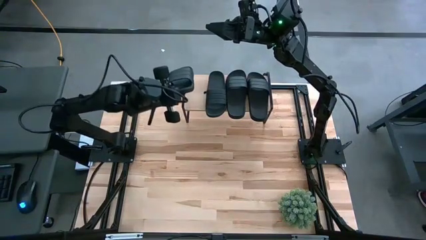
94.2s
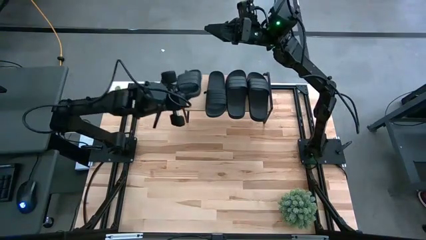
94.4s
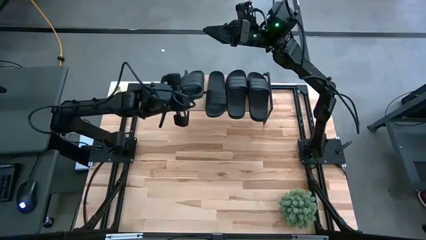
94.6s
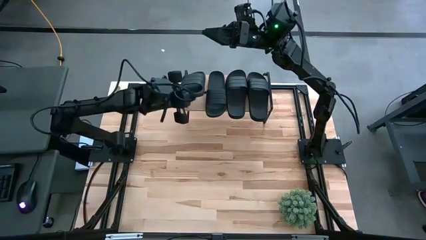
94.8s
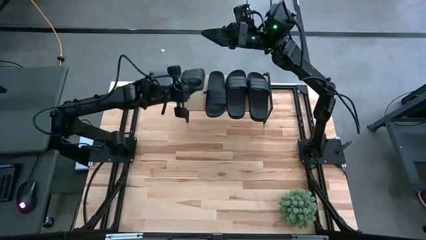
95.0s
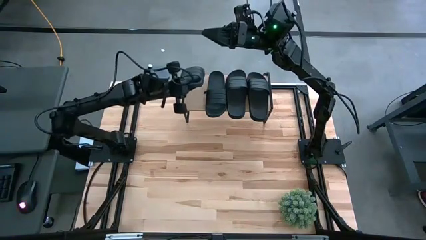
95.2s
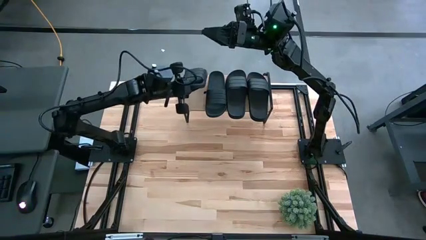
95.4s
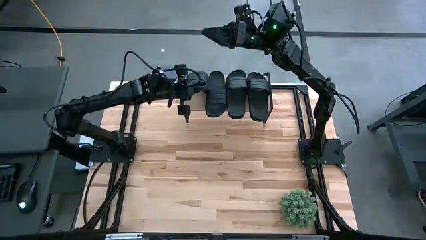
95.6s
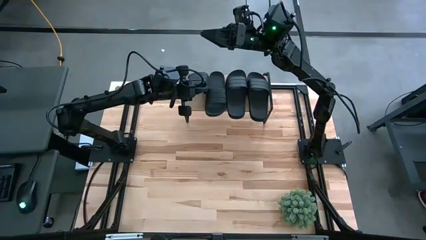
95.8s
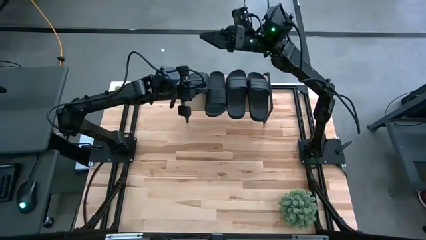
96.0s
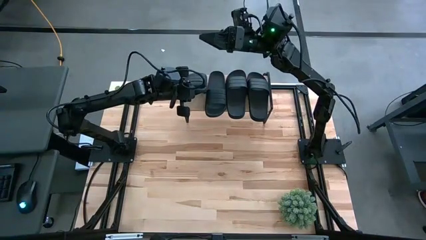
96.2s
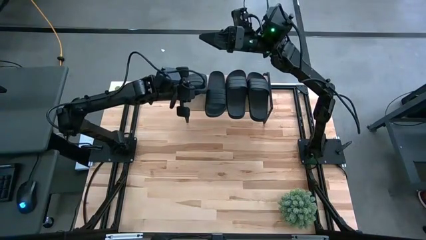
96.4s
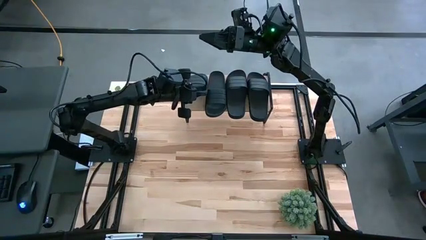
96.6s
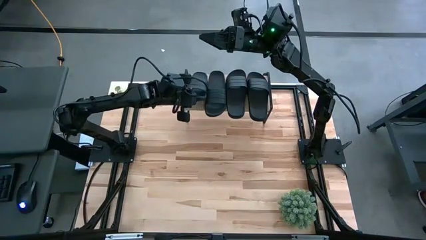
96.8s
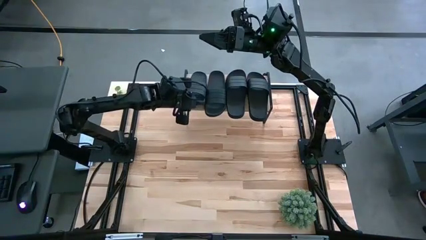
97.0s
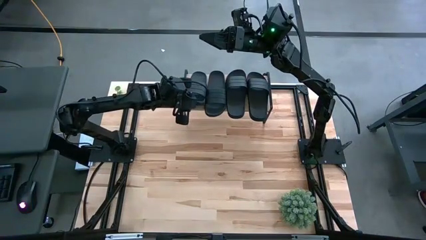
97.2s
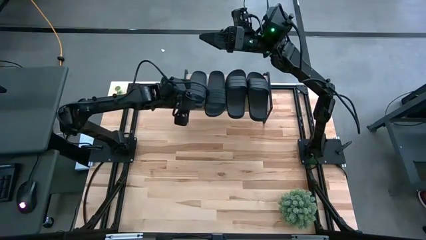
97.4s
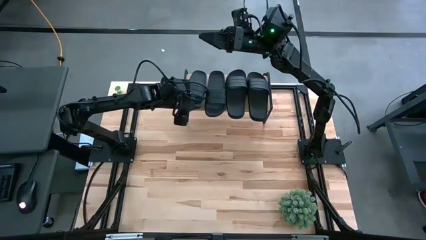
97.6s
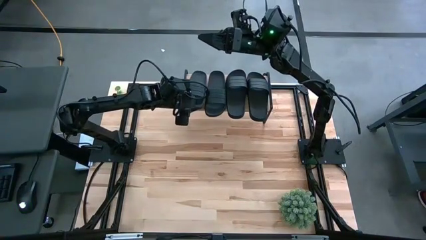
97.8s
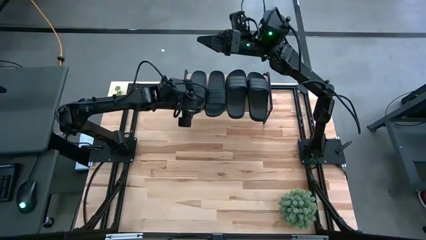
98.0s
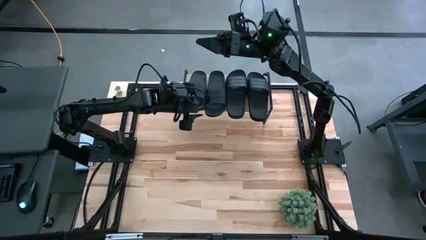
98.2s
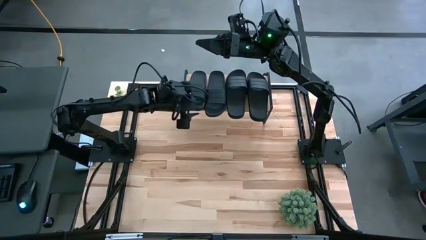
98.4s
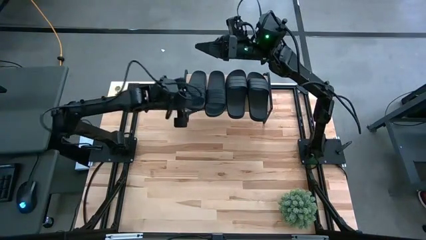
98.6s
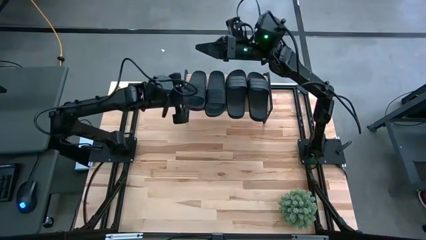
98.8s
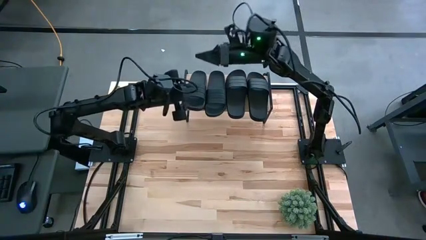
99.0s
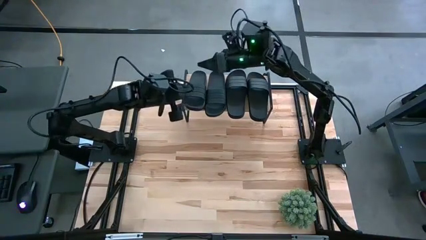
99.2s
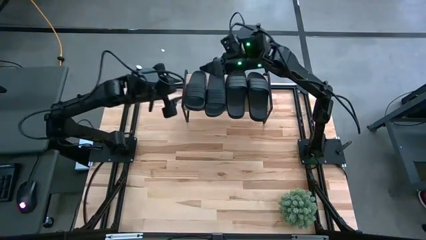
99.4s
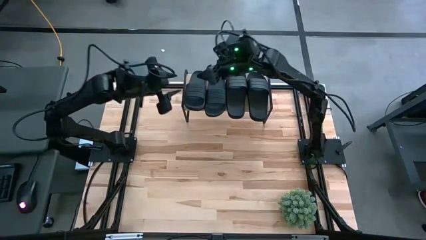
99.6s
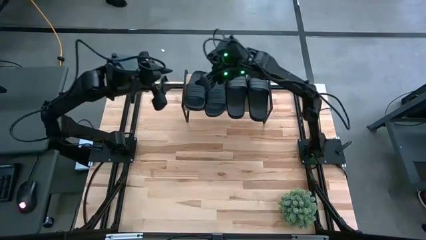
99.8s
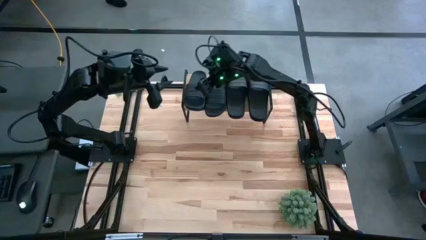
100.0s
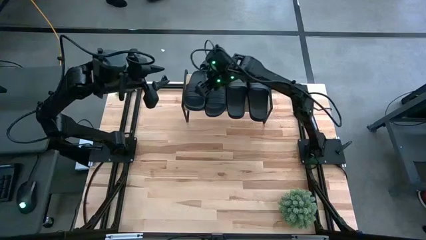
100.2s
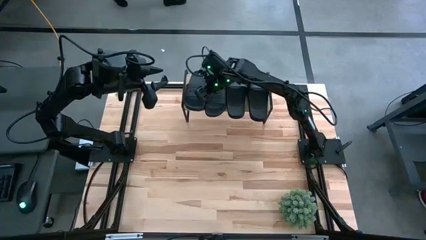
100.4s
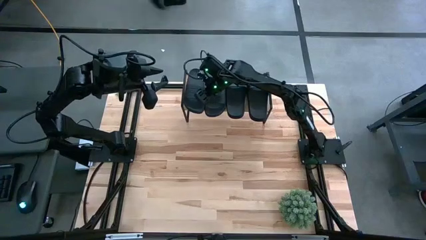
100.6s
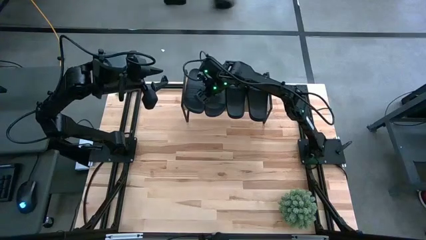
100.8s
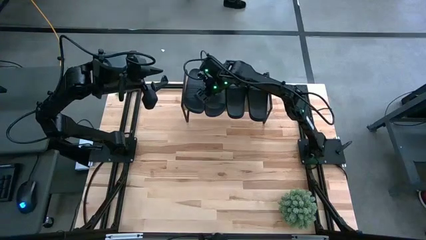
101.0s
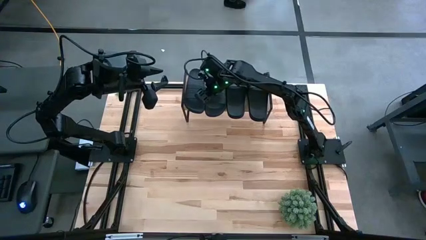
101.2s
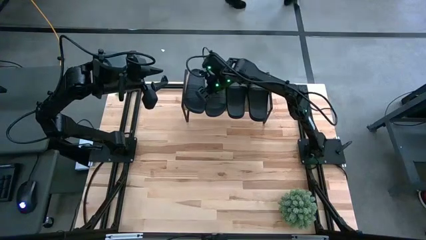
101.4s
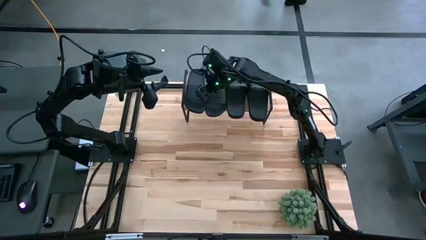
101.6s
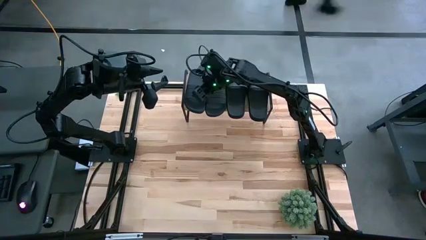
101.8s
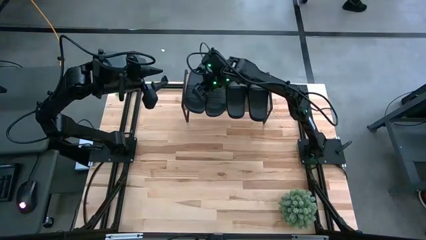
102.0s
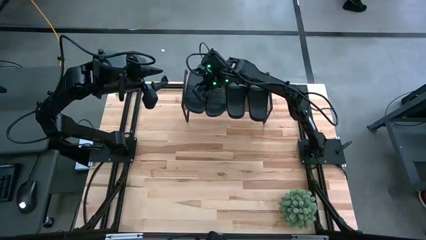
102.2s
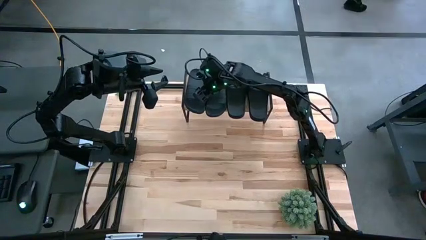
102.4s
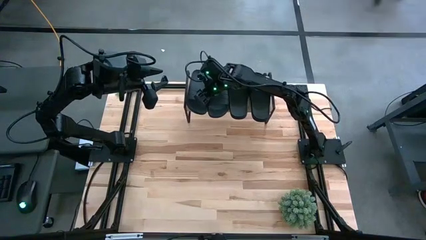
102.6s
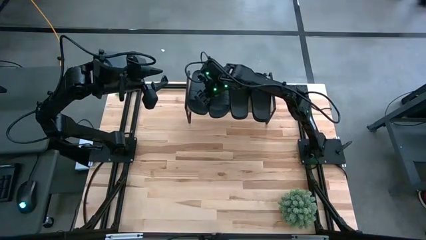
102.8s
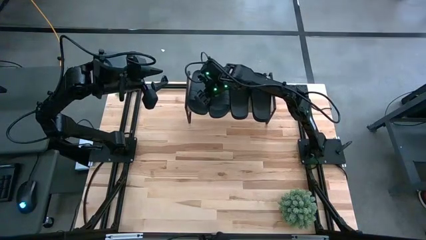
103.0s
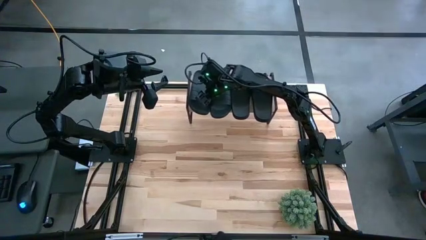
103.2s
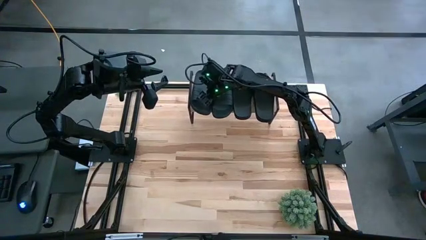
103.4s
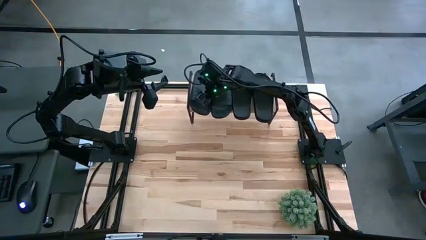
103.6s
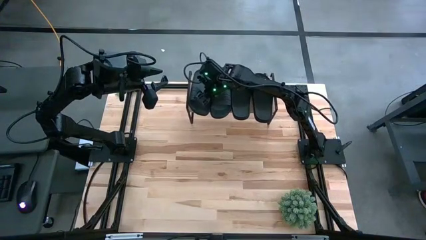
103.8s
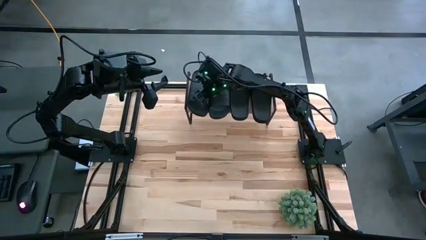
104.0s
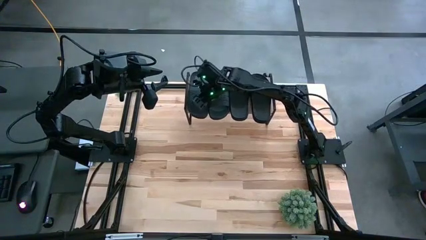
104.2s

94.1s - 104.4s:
Task: Pick and place slides into the shelf
Put the black slide on the shelf

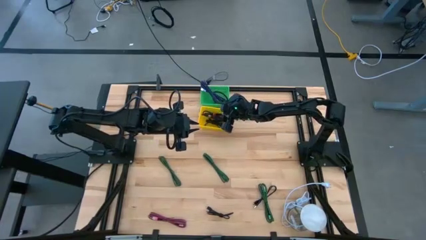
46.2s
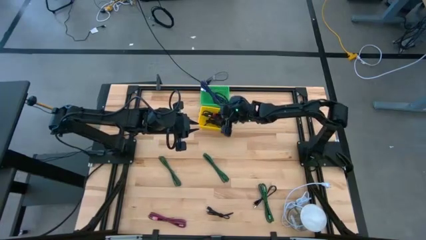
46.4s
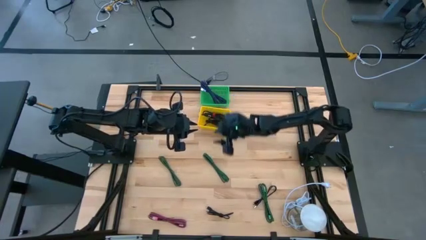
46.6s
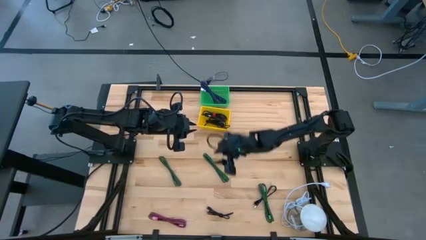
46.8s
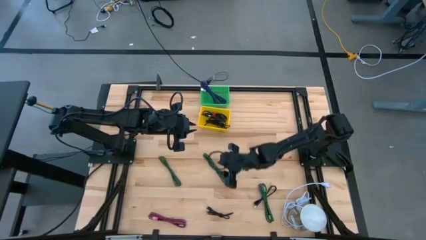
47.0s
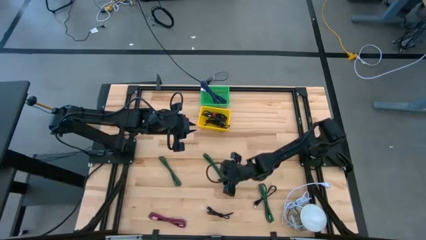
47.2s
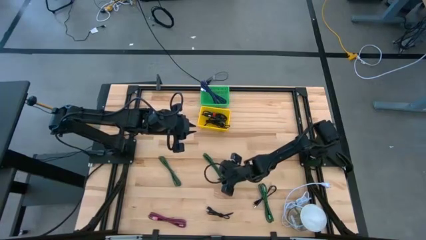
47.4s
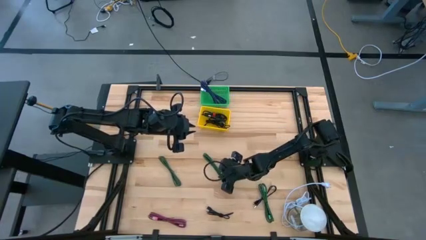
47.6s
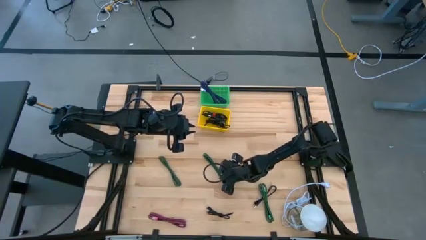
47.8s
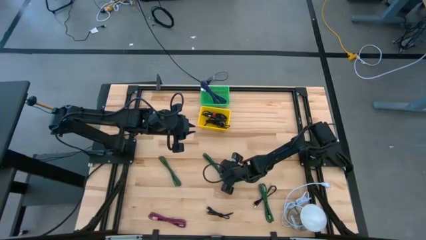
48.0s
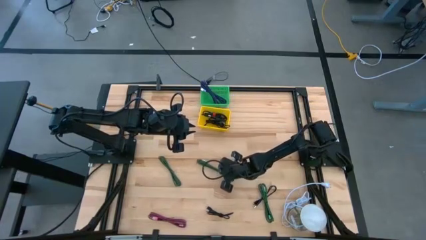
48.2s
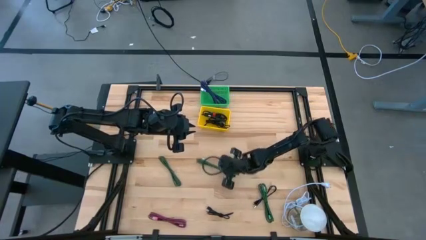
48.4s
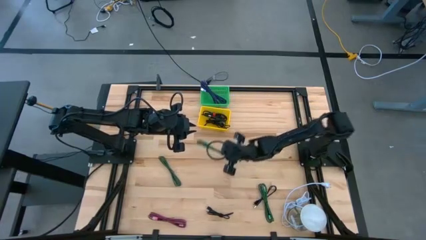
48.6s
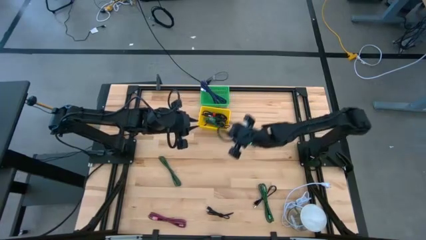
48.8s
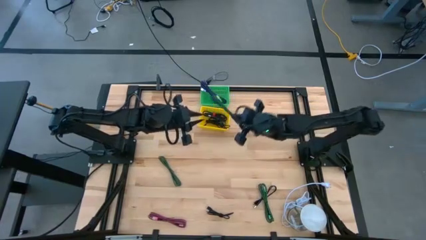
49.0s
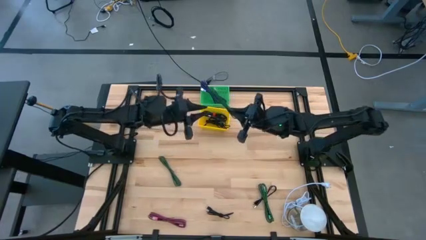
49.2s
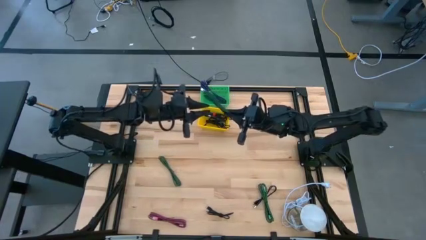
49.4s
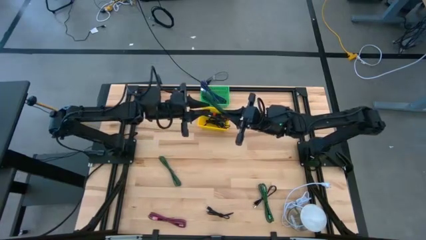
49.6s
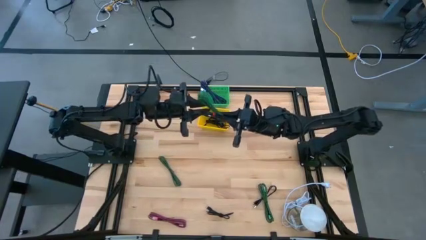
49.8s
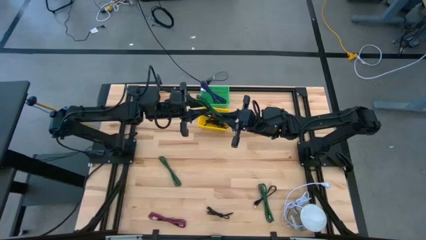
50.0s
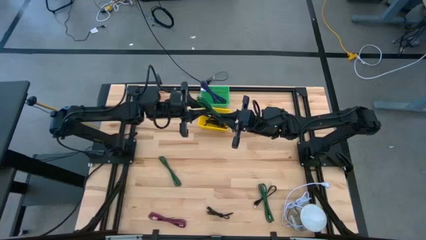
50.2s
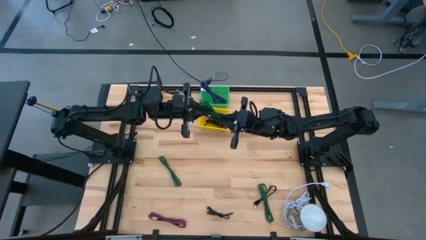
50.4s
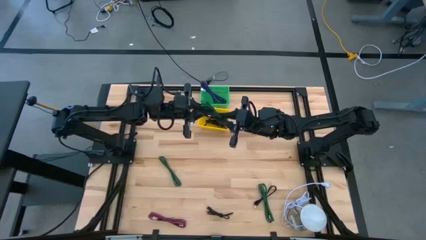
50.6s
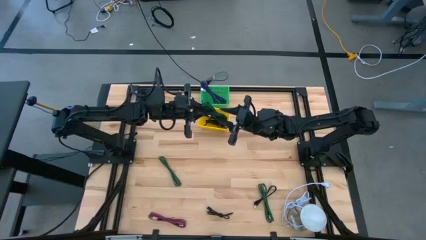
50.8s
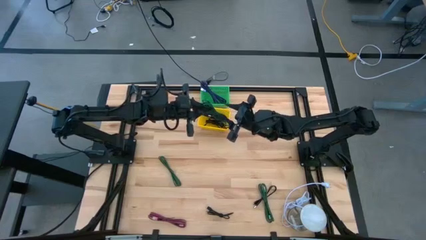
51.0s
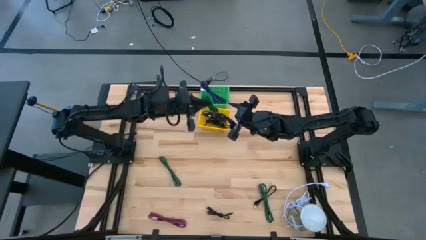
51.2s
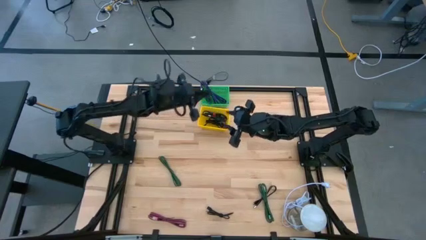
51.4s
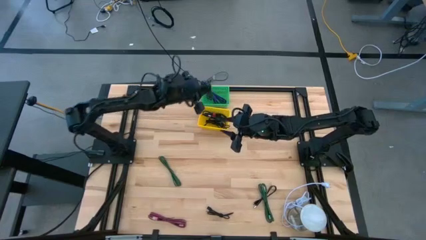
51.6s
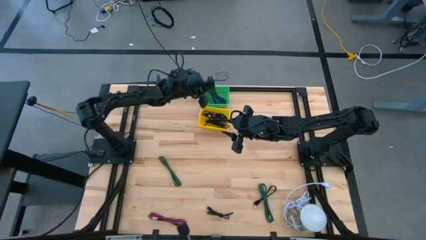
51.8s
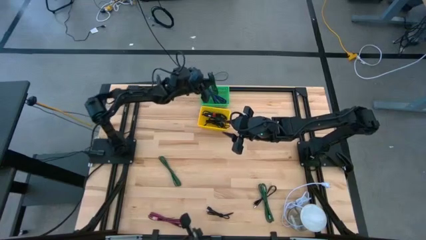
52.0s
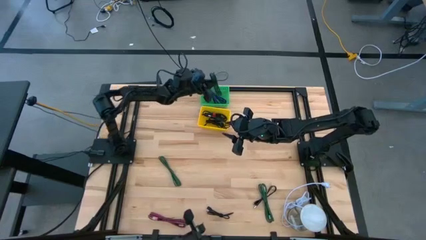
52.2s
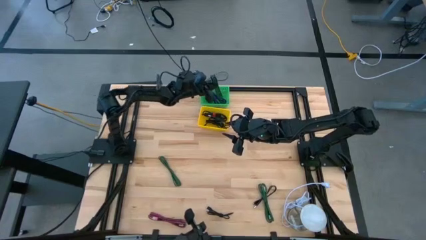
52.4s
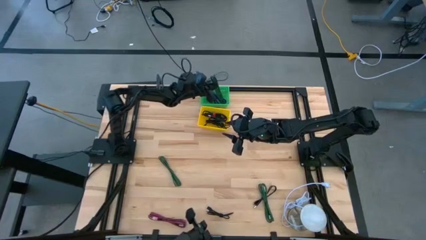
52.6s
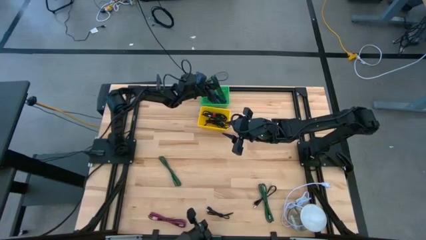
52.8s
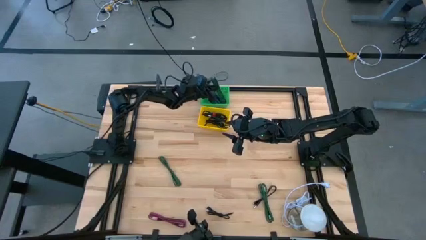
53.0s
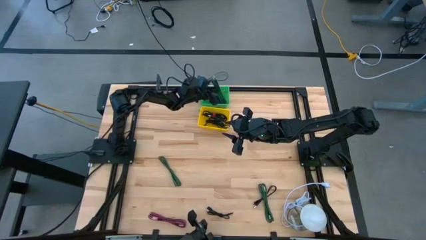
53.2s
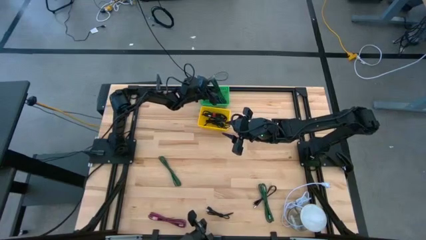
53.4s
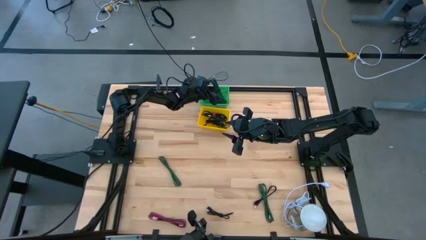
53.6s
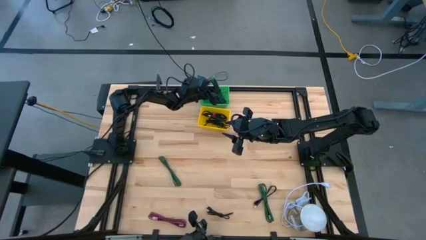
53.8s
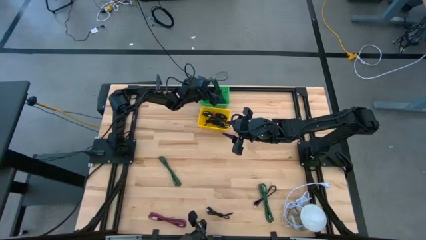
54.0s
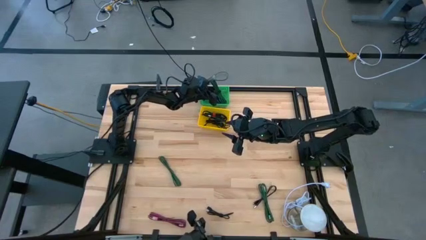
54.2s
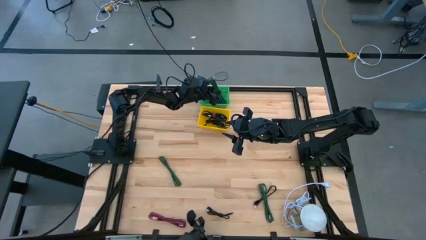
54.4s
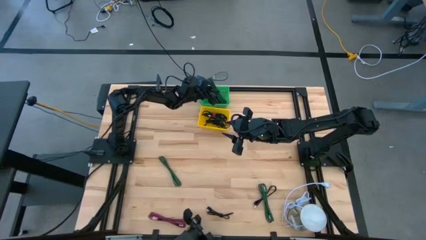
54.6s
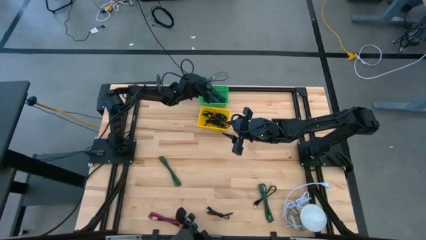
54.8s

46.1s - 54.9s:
Task: Pick & Place USB Port
Put the green charger cable into the green basket
